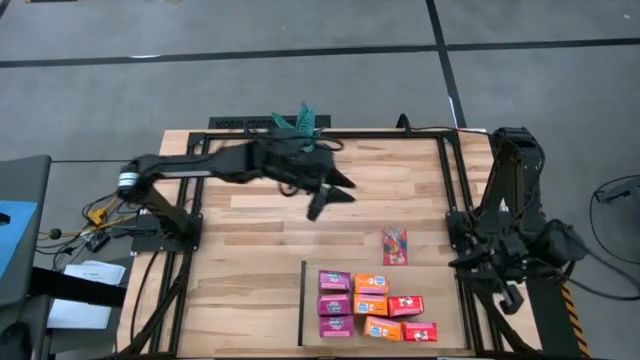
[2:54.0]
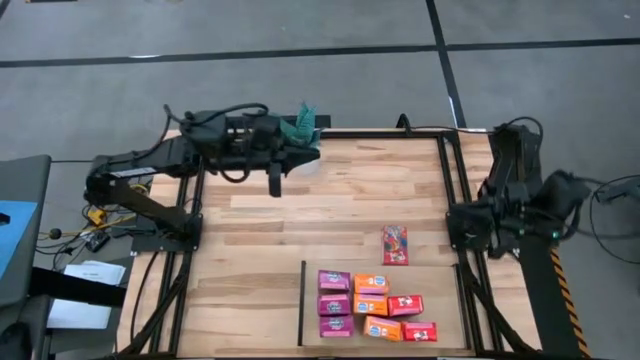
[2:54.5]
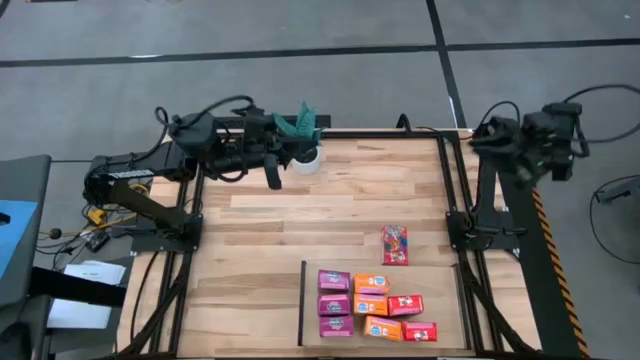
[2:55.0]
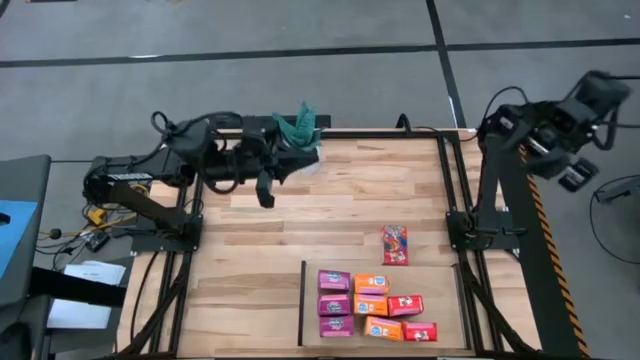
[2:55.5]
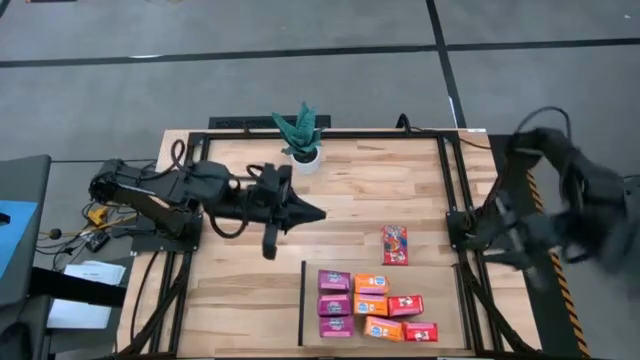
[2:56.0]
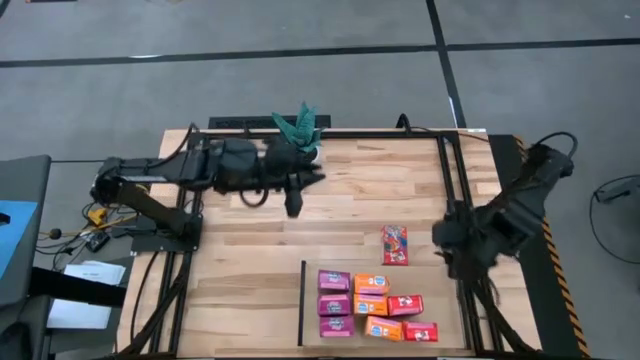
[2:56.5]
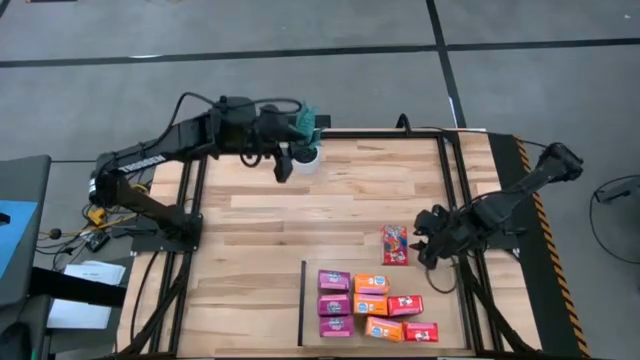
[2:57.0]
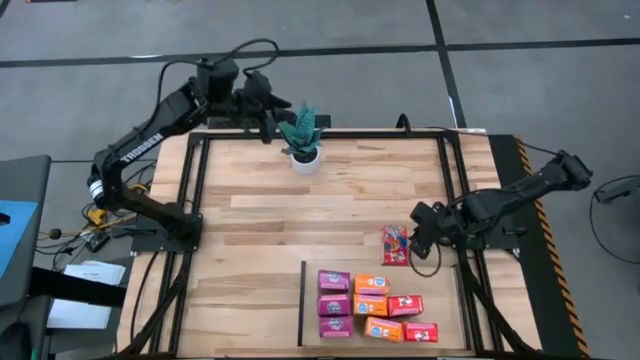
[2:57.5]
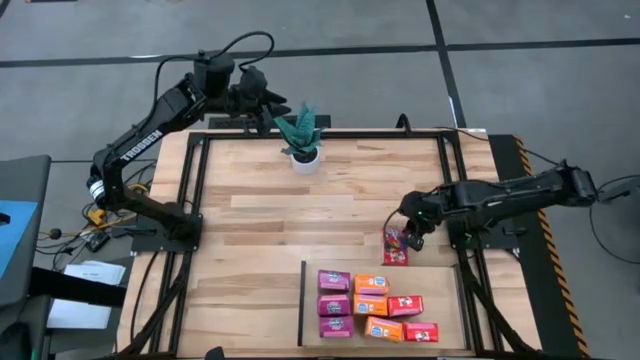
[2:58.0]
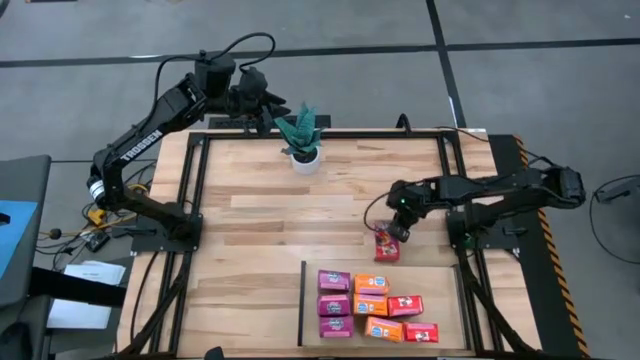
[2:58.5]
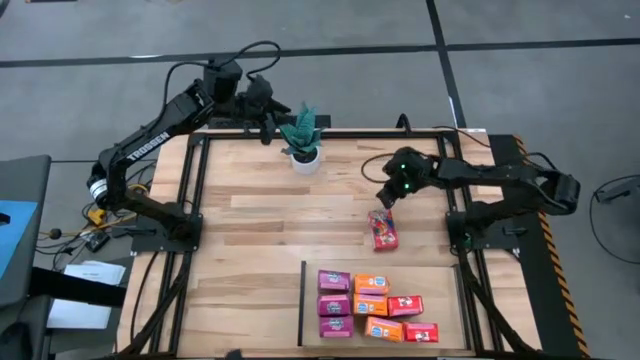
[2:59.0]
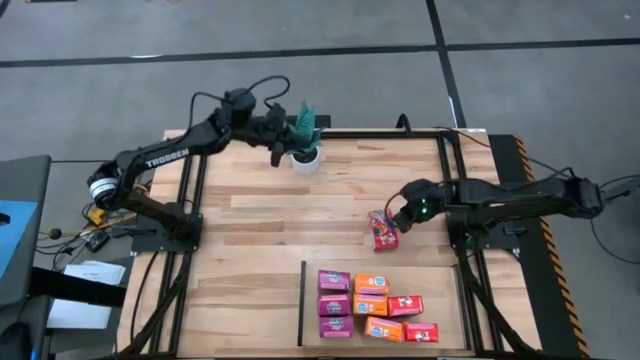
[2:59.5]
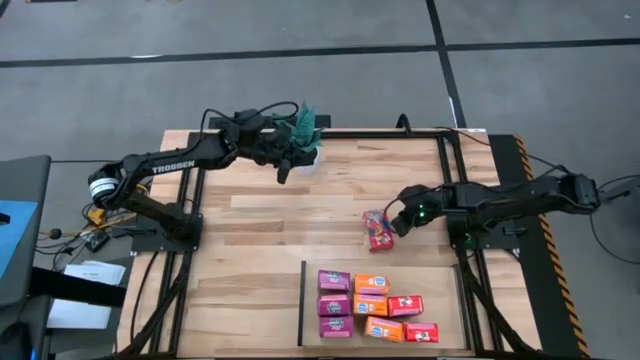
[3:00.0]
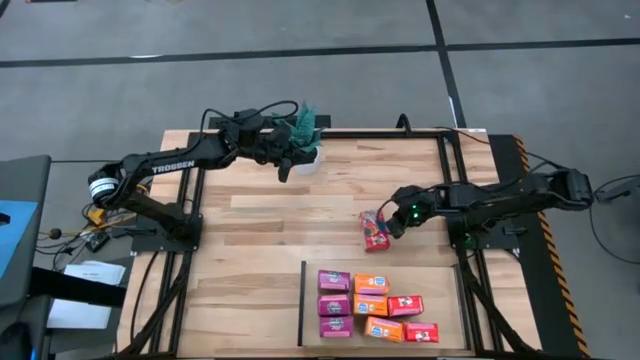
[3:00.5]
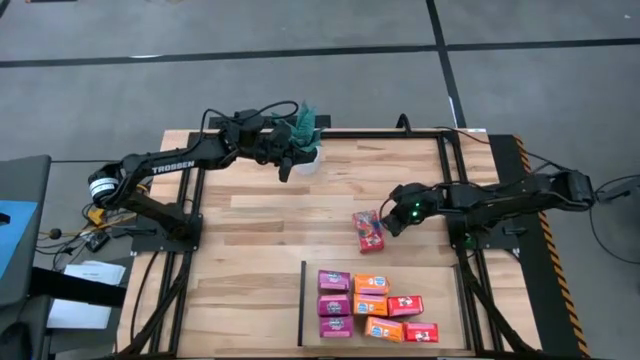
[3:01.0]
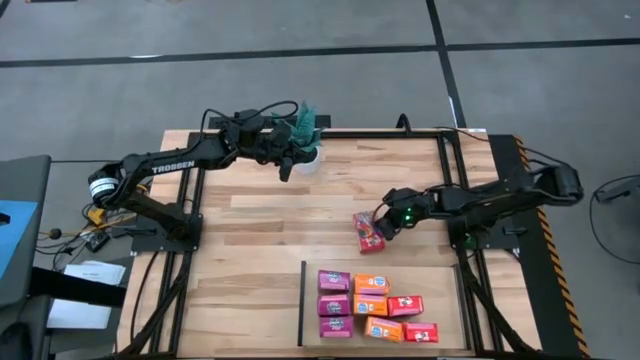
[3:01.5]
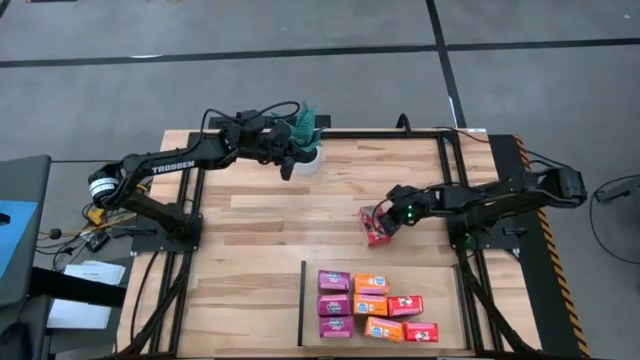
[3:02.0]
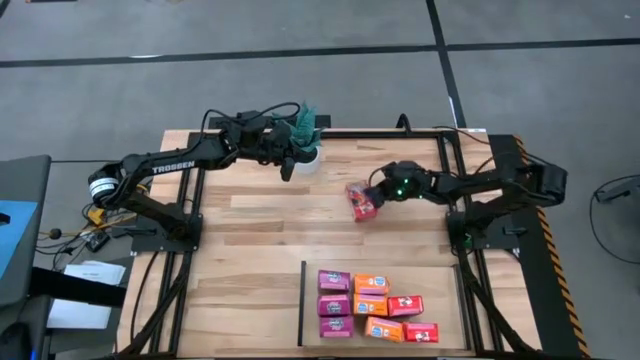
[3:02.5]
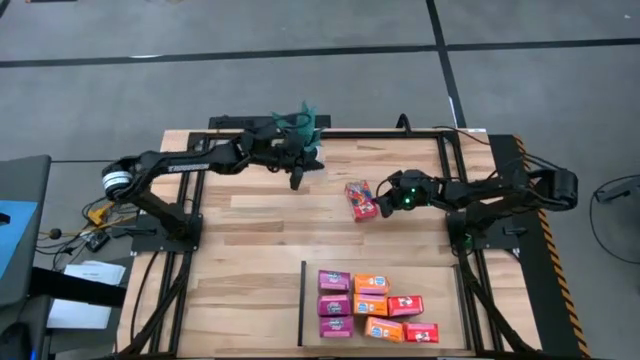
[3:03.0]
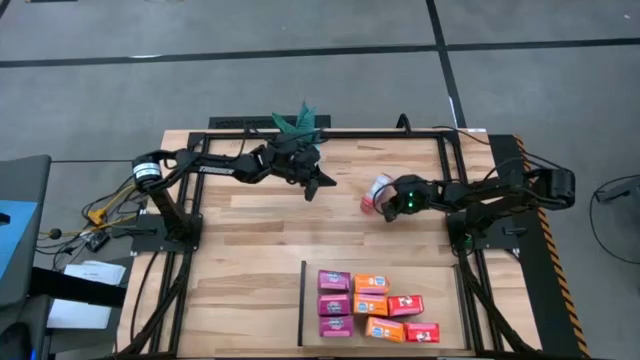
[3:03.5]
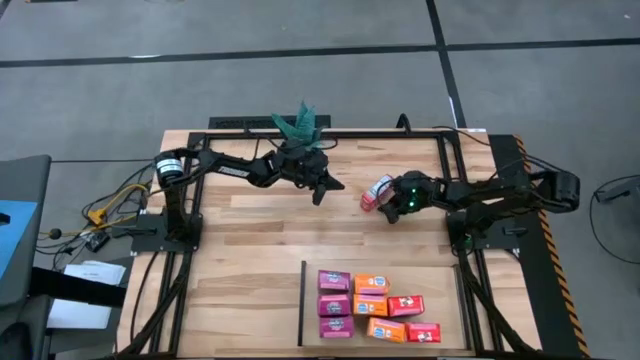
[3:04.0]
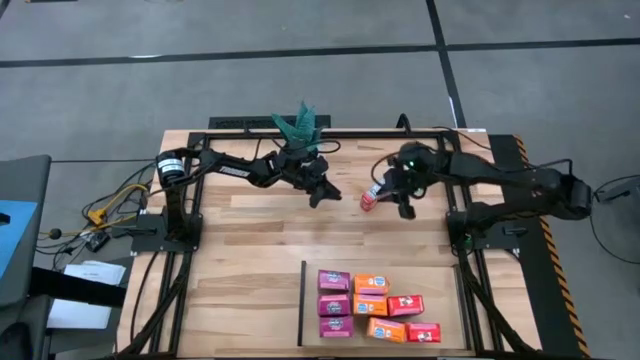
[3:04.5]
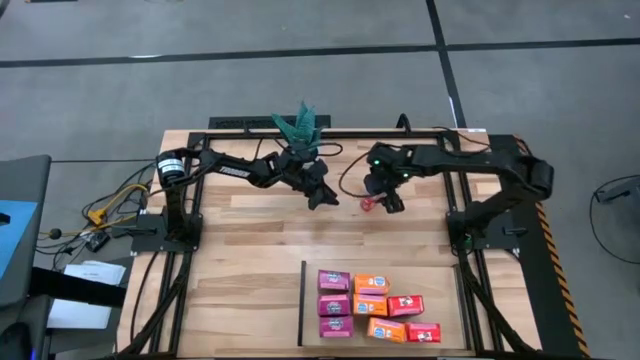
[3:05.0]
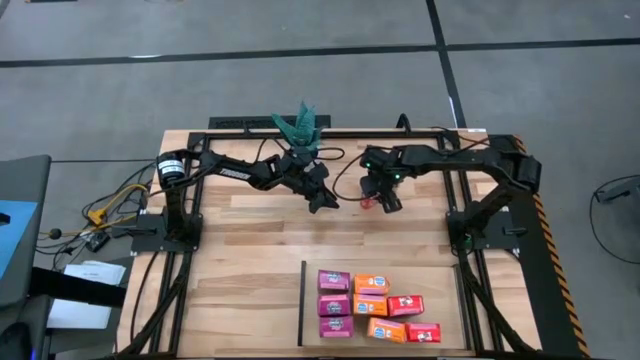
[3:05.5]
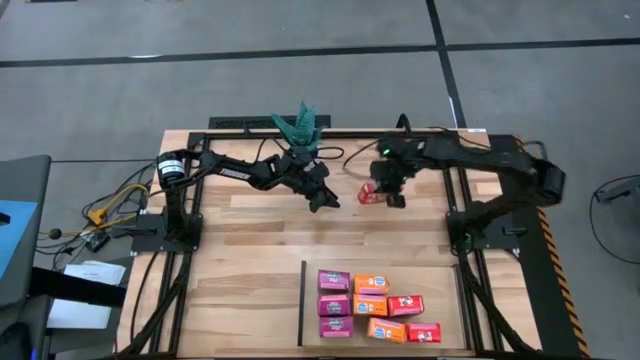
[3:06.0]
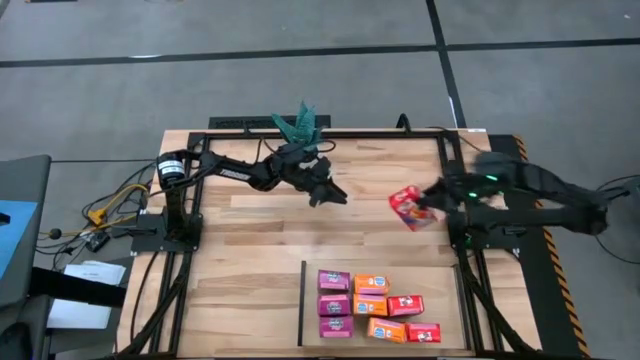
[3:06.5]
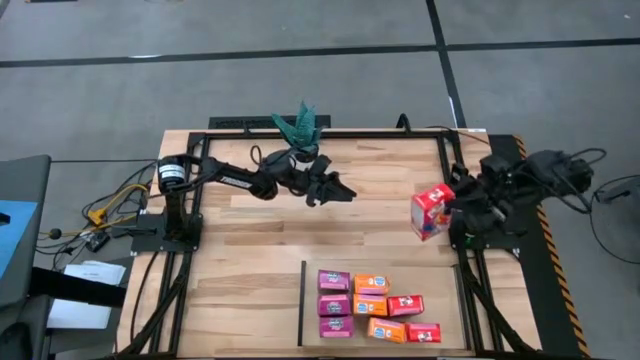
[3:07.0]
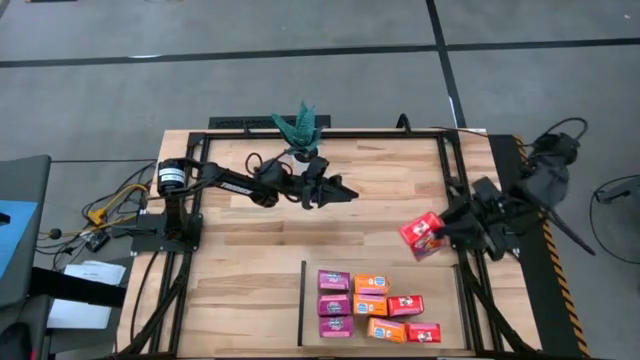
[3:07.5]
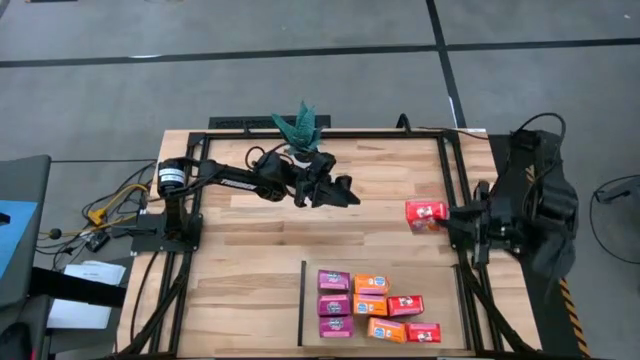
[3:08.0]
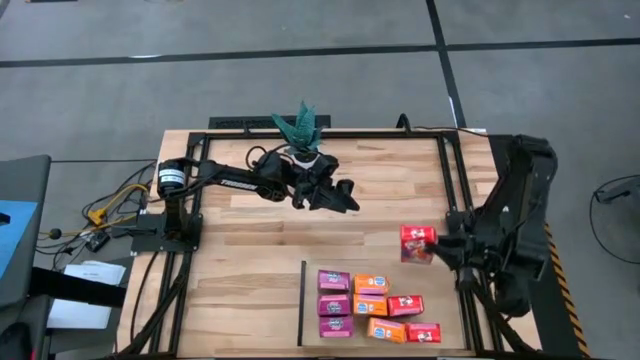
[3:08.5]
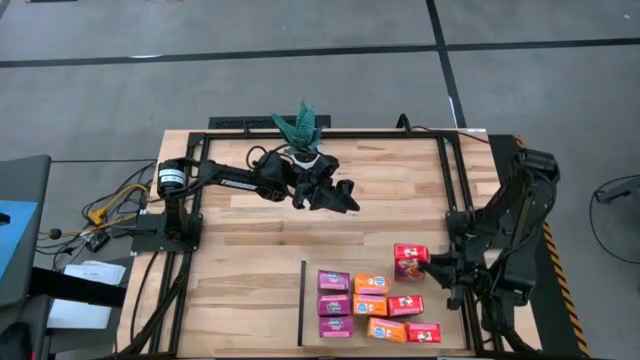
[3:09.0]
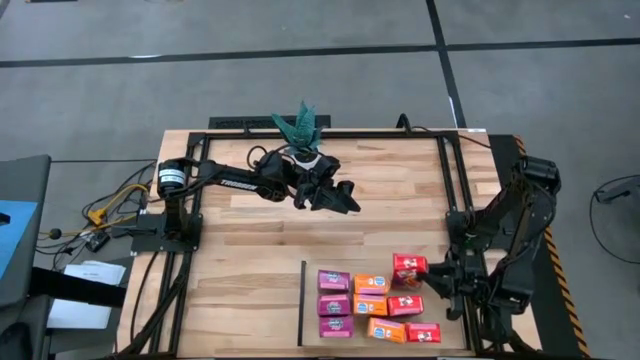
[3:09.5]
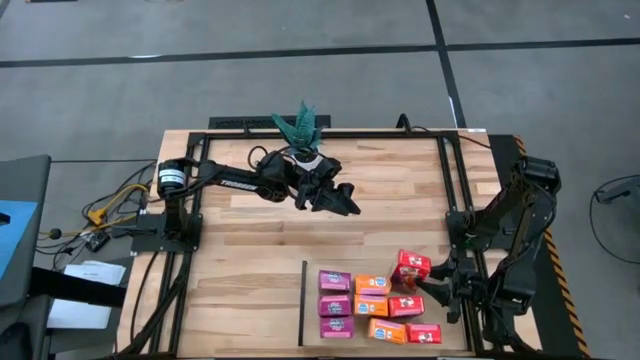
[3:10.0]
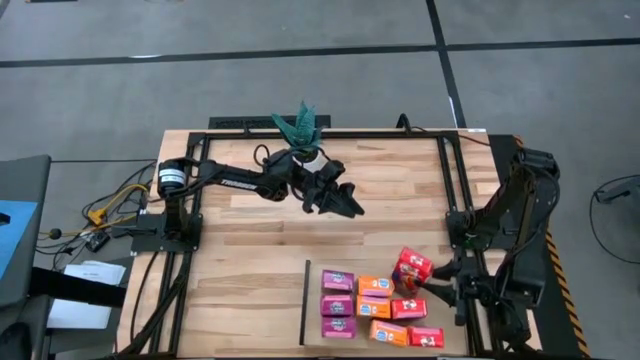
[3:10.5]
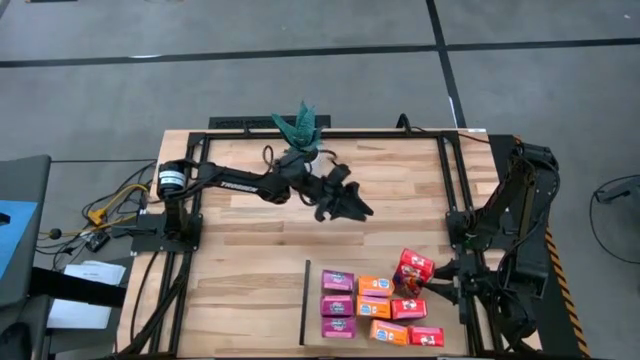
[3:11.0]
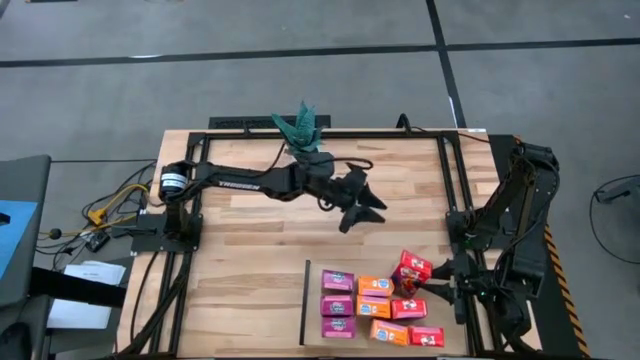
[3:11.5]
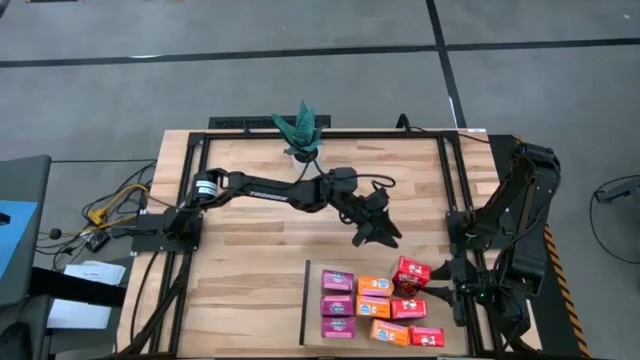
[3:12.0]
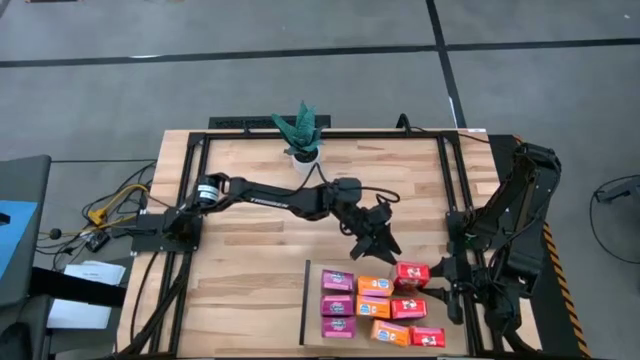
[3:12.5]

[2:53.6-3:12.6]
Task: Stack cereal on shelf
Put the red cereal box on the upper right shelf
